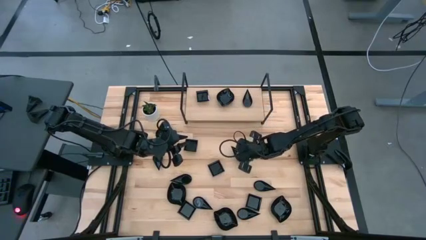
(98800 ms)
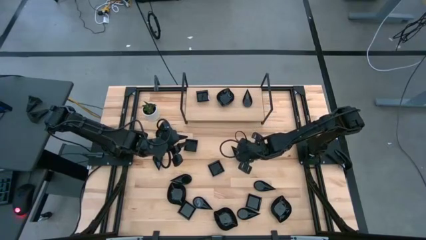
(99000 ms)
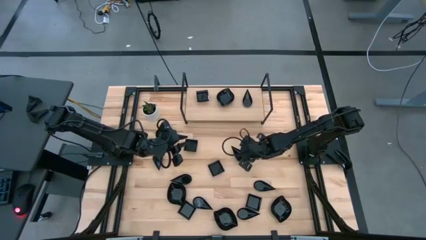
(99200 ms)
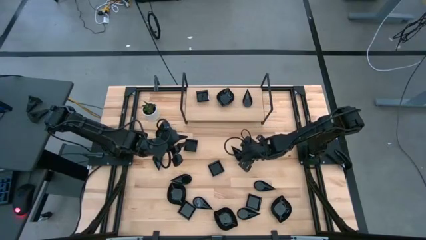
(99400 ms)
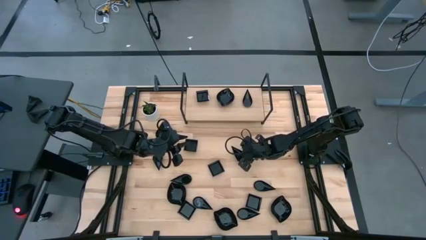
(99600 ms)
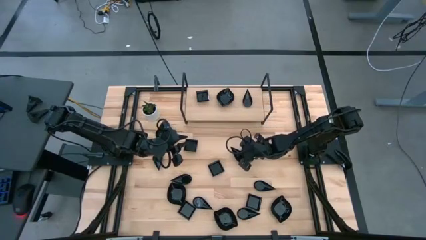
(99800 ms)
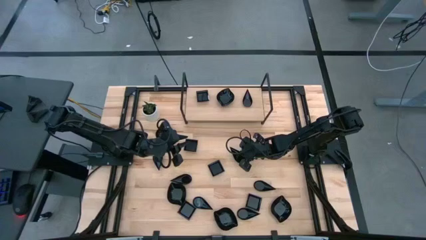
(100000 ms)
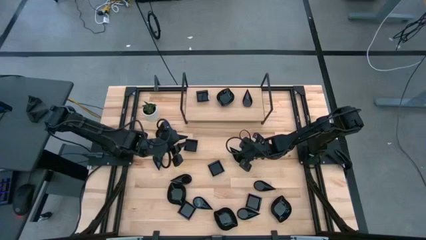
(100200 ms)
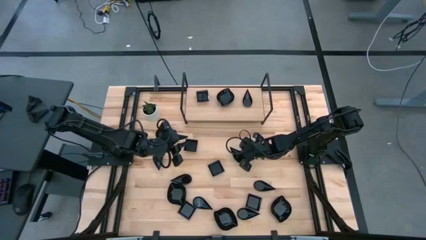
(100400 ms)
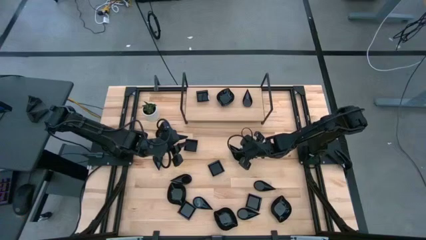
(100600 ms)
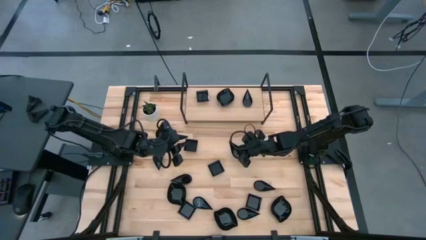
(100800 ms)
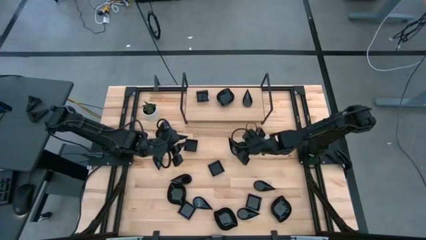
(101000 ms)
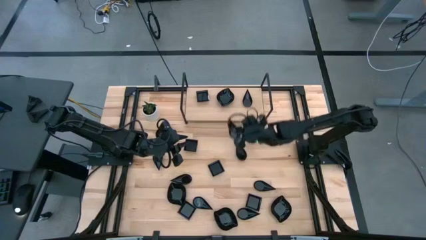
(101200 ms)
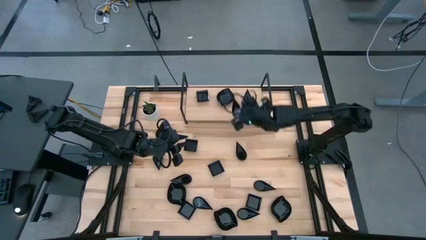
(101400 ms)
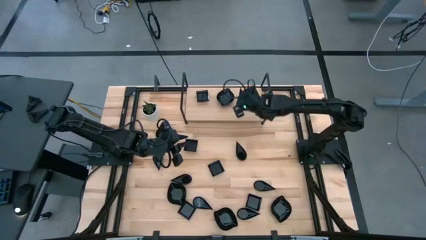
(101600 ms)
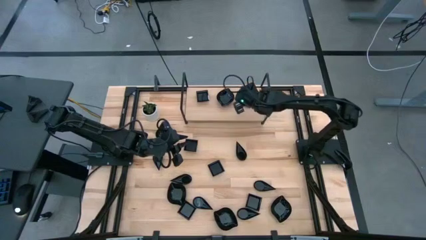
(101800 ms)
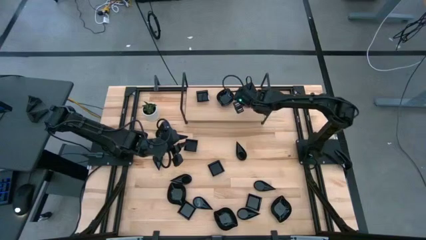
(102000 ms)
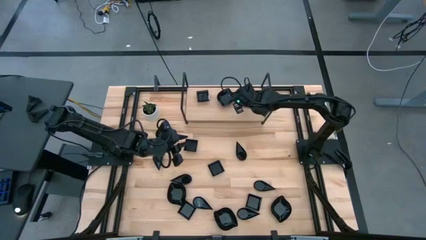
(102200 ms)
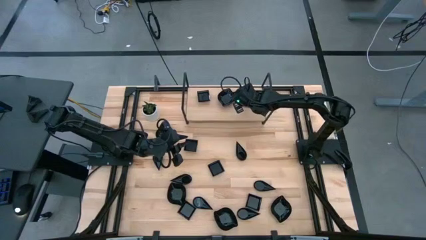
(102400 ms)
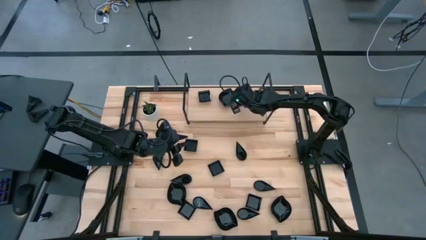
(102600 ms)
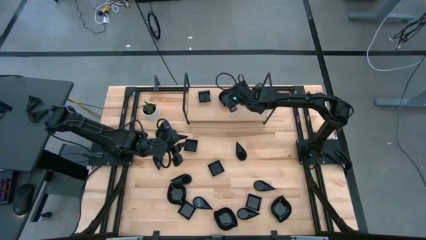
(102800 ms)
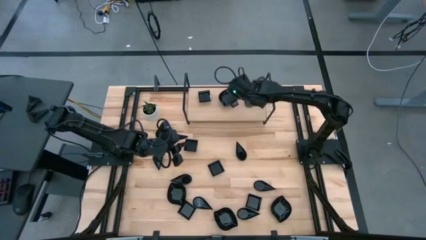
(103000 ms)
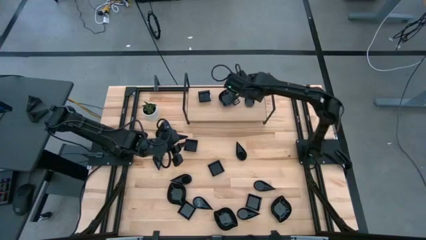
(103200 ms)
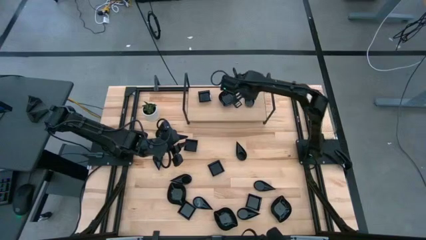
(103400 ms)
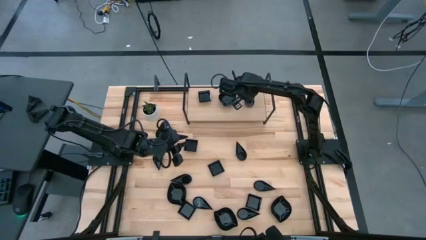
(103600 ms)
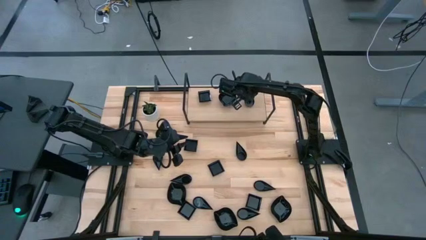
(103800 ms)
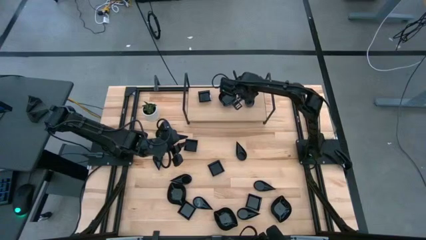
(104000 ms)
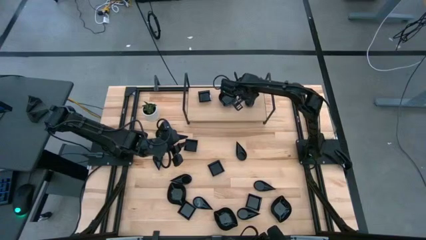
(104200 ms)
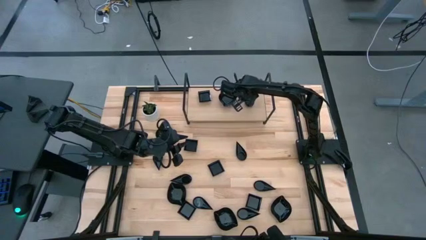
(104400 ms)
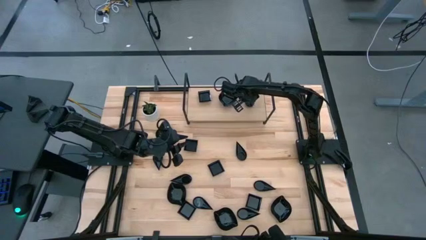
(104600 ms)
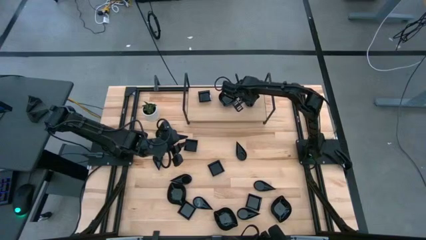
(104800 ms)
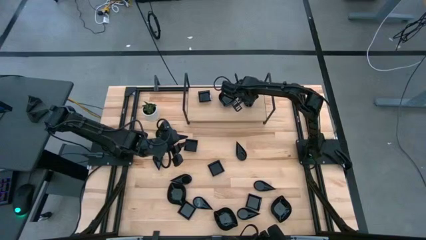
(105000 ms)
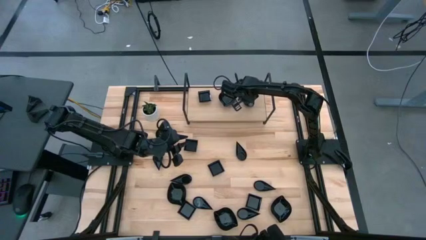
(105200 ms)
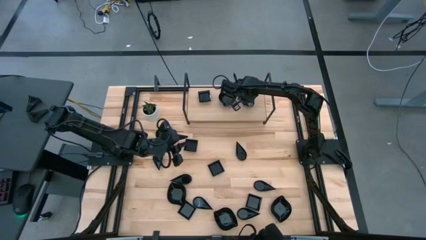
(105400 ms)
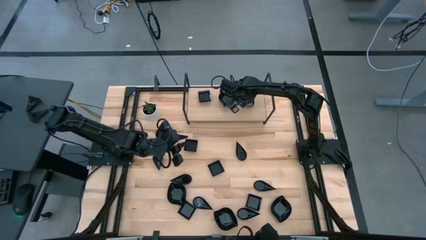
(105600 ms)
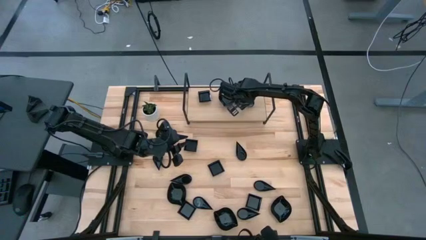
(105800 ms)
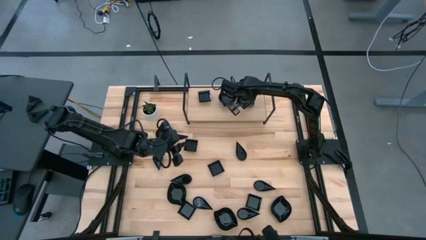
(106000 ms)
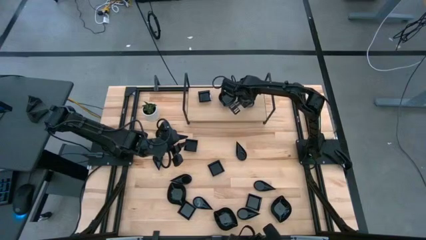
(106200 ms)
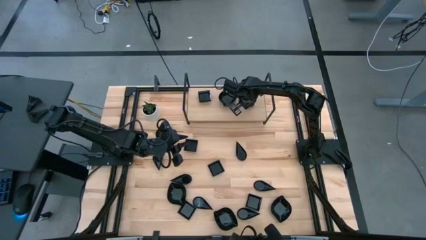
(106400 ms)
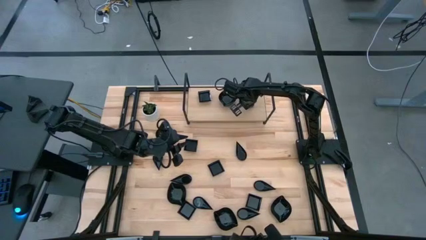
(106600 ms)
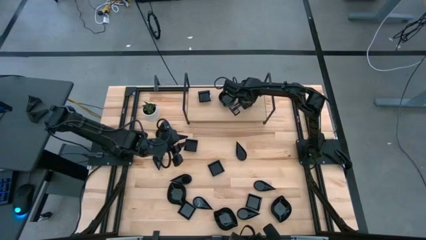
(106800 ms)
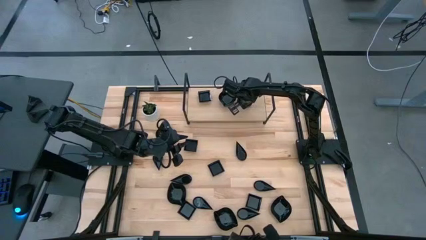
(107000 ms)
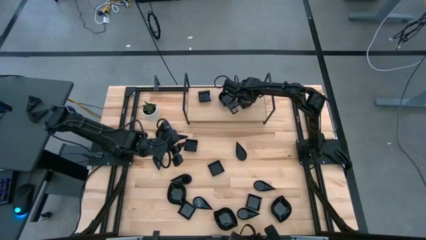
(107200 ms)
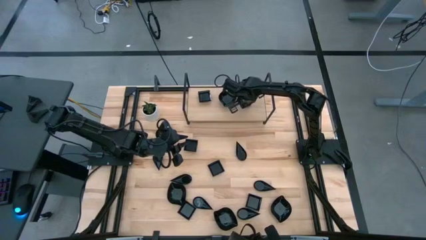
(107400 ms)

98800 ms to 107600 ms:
Task: Pick & Place Mini shaped plates
Stack the top black teardrop shape bowl on top of the other black teardrop shape bowl on the shelf

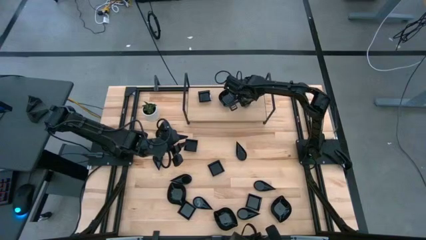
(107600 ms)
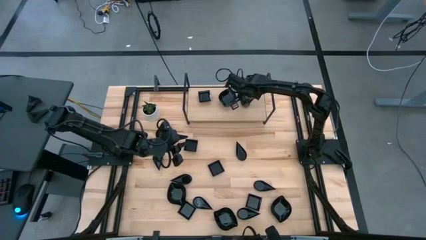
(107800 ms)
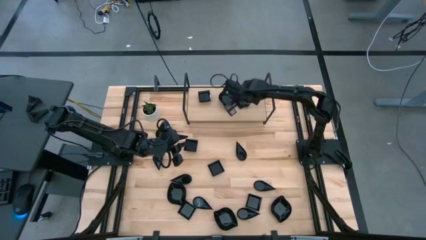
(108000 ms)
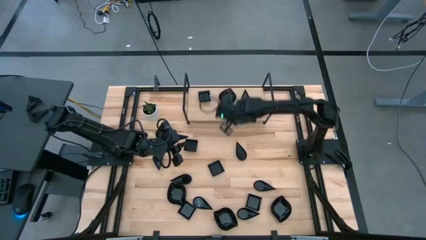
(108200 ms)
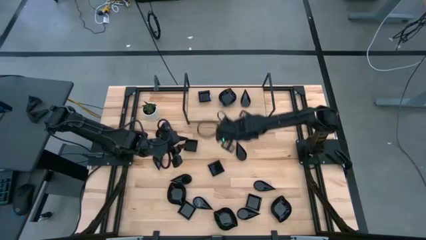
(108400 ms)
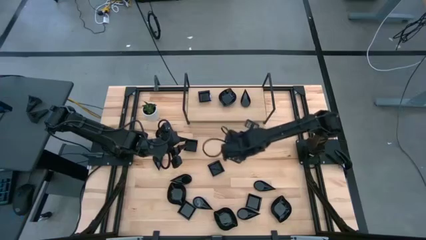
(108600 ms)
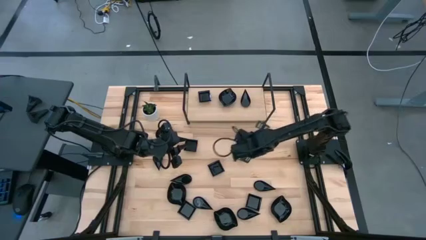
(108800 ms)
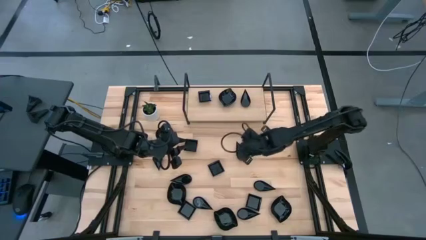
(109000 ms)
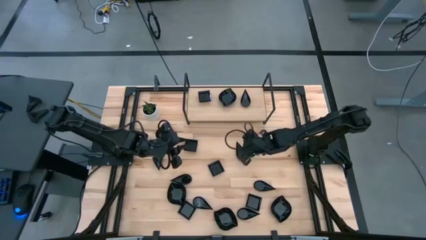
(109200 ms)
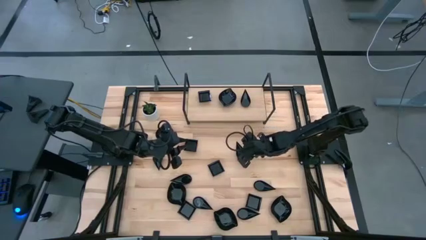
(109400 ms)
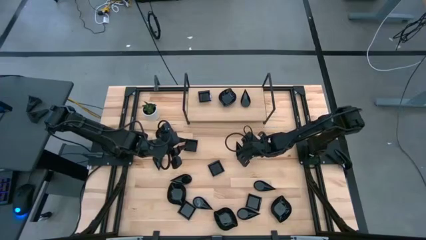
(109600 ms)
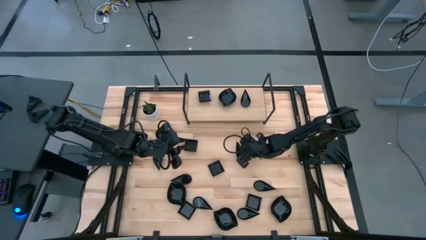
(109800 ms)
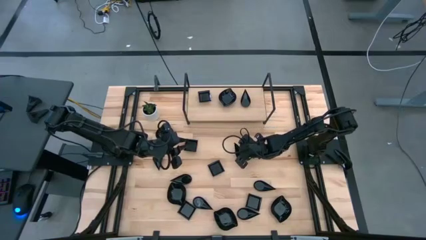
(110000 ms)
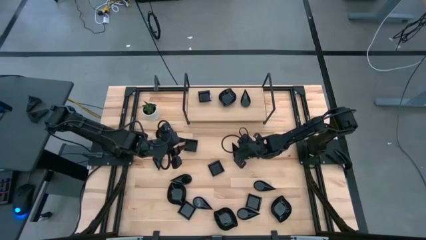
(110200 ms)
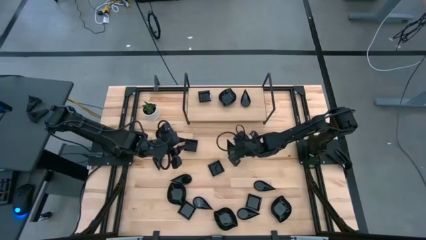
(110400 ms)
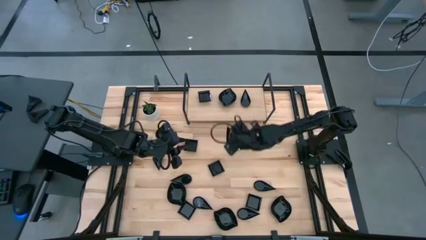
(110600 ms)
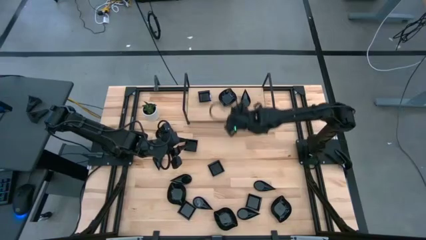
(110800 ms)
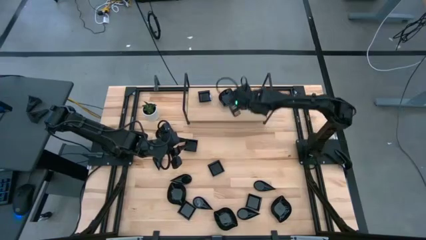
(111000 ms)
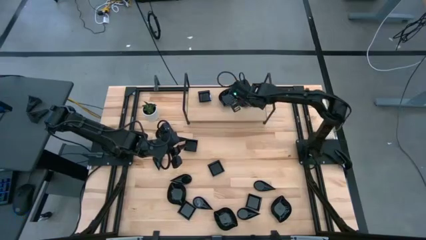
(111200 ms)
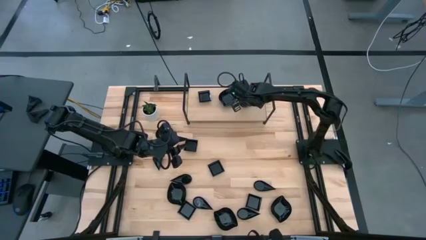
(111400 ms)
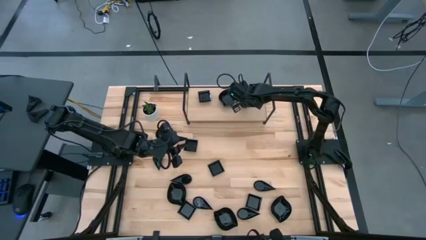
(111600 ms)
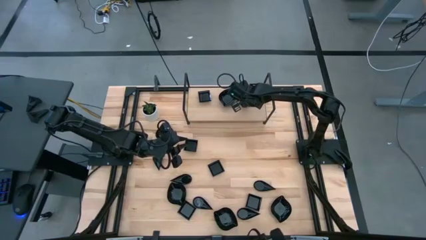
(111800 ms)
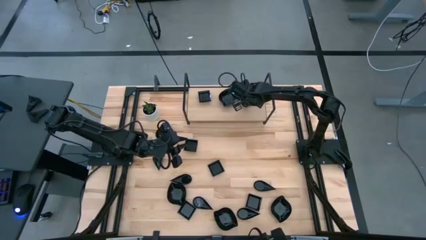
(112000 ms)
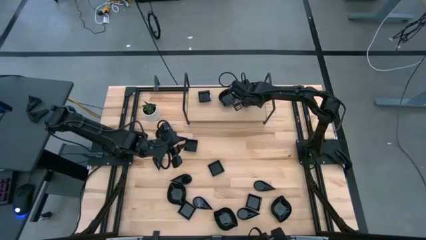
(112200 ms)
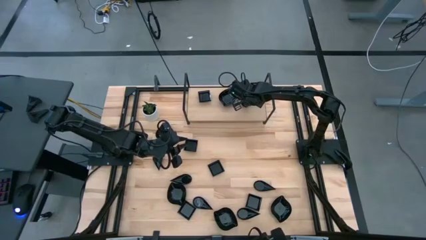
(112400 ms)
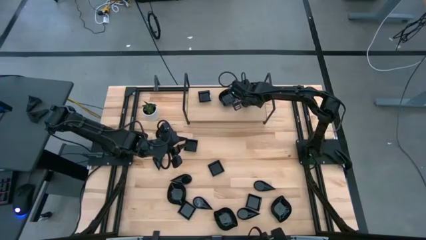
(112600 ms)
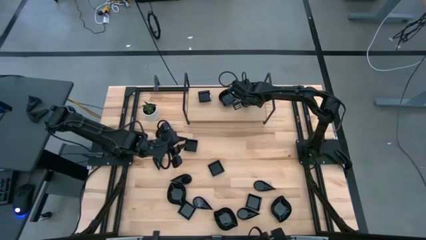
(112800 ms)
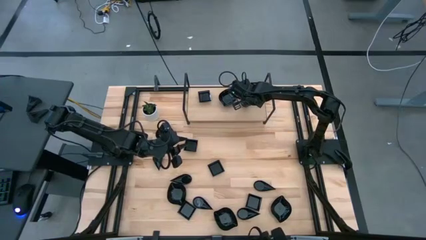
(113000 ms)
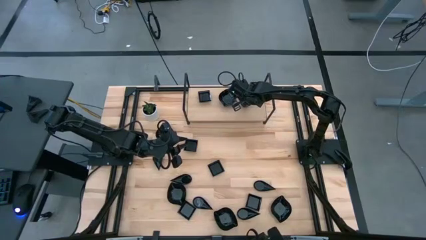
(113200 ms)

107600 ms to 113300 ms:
Stack the top black teardrop shape bowl on top of the other black teardrop shape bowl on the shelf

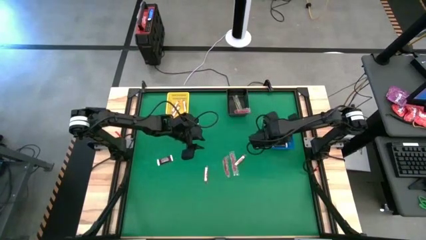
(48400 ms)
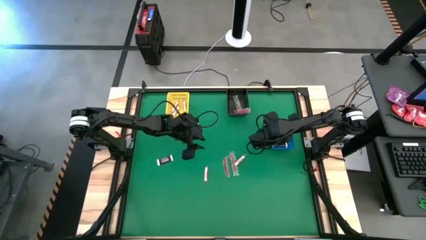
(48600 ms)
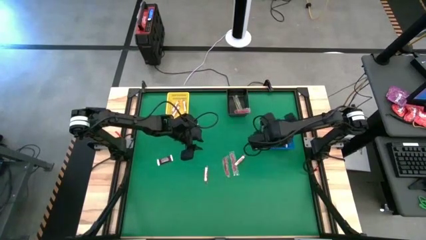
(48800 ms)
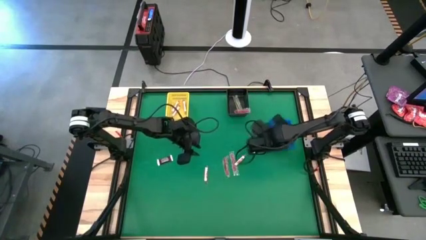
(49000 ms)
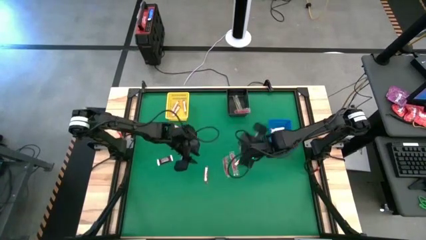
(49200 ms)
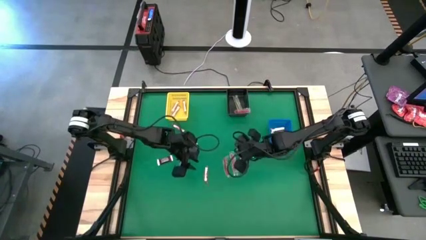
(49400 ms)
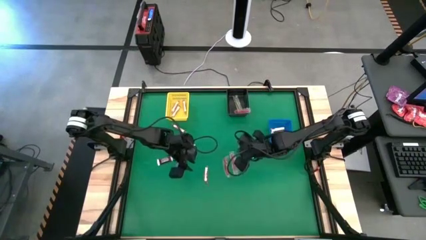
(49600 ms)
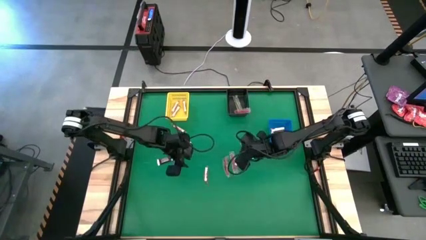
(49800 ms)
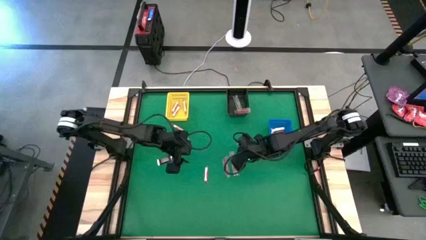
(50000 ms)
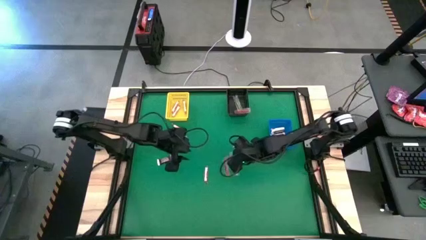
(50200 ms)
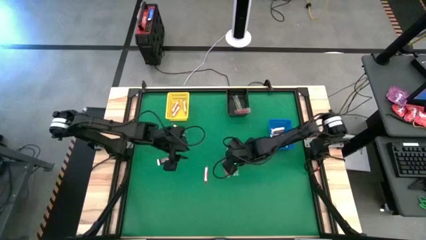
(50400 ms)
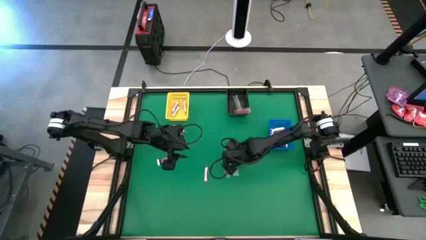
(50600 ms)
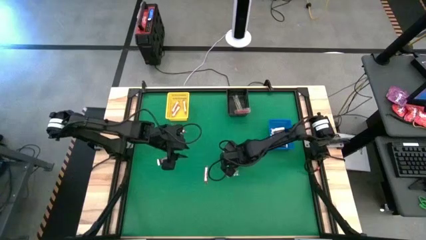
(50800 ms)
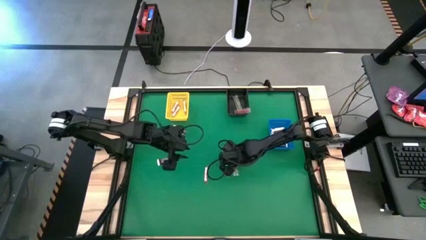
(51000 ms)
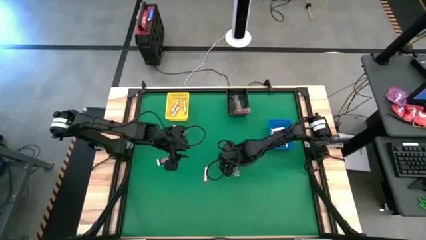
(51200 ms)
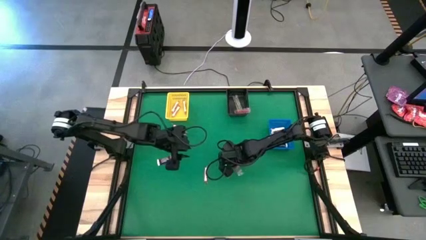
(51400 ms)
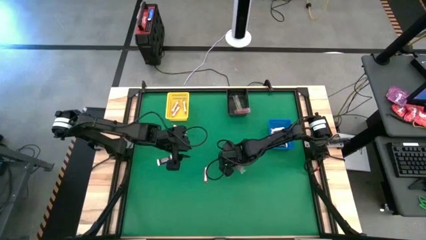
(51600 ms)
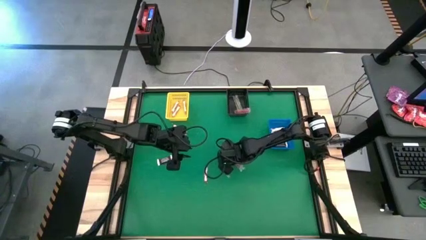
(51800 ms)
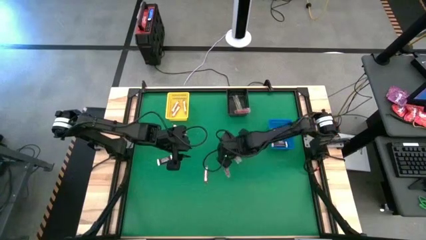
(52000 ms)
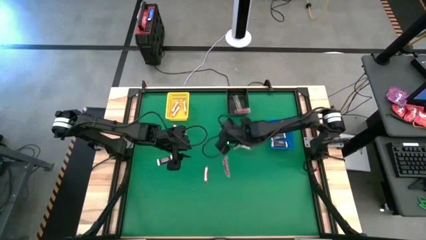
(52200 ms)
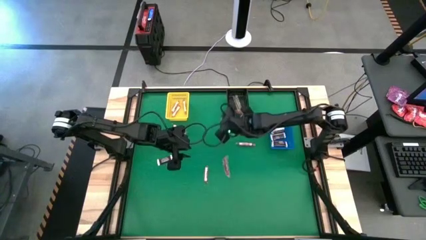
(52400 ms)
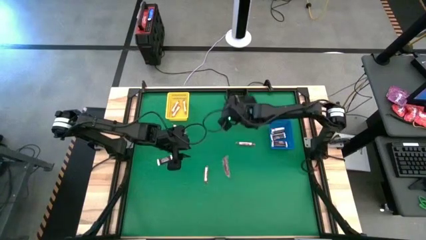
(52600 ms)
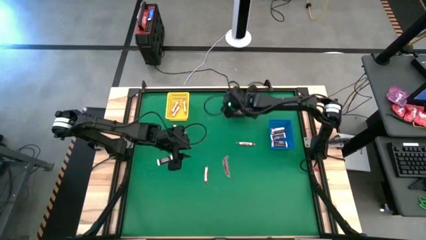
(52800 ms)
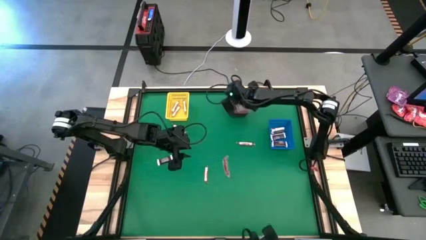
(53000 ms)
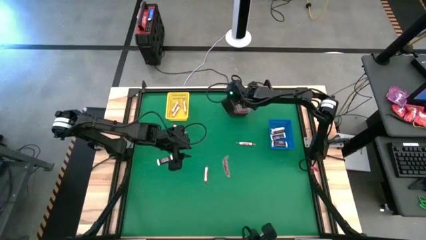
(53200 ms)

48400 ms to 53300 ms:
Task: Sort candy by brand, put in halloween buckets
Put the red candy into the black basket
